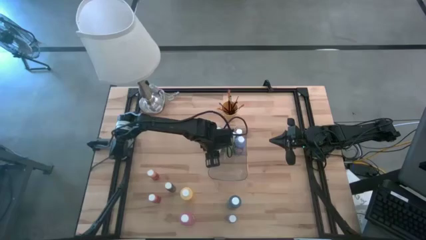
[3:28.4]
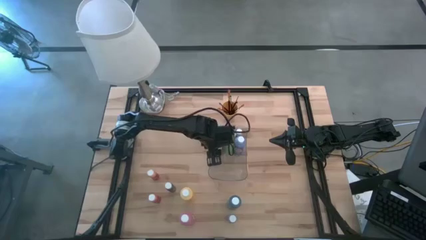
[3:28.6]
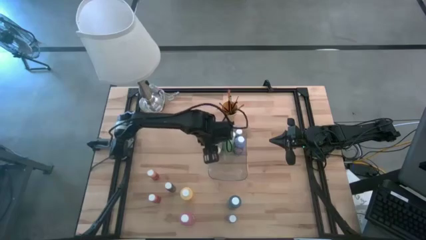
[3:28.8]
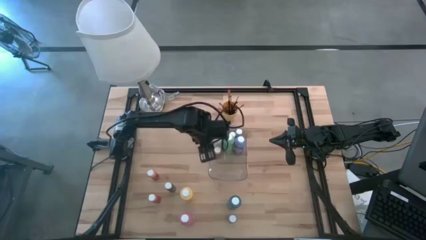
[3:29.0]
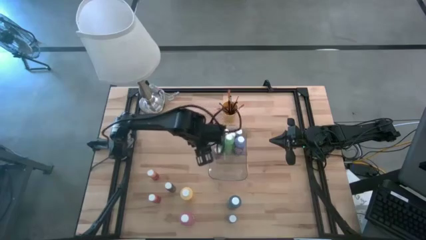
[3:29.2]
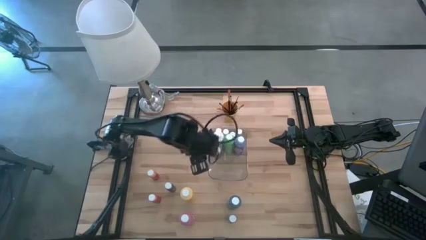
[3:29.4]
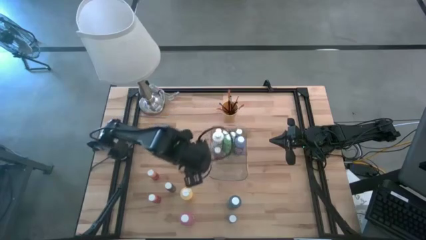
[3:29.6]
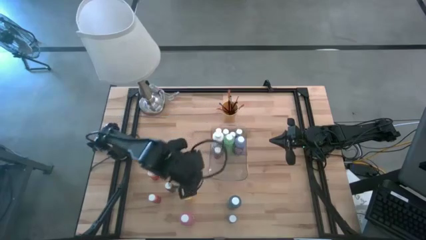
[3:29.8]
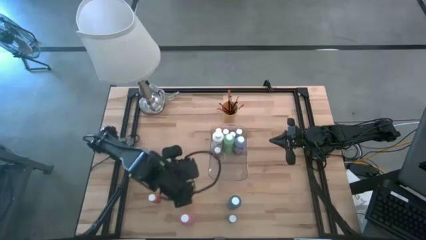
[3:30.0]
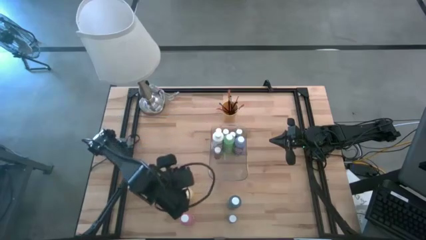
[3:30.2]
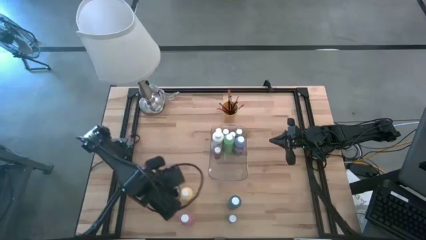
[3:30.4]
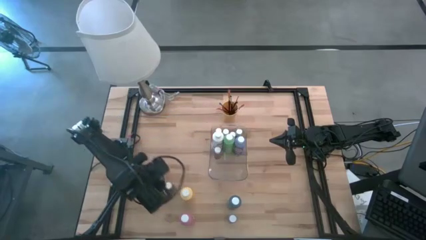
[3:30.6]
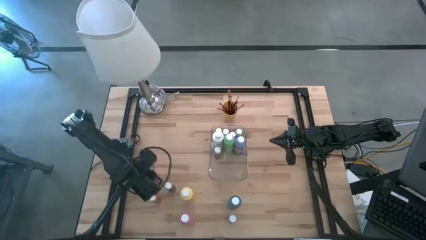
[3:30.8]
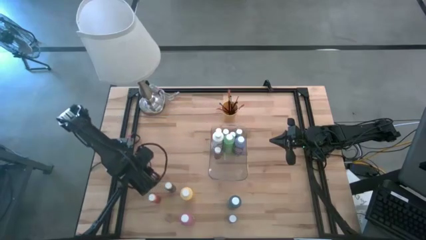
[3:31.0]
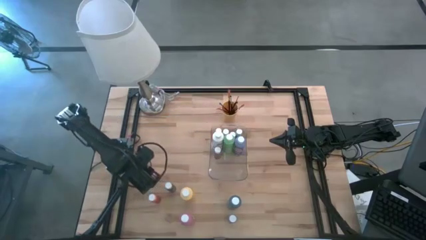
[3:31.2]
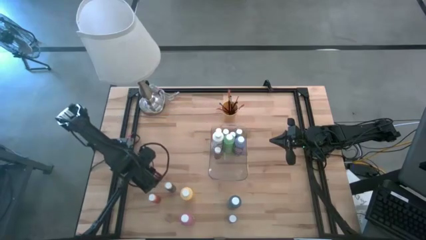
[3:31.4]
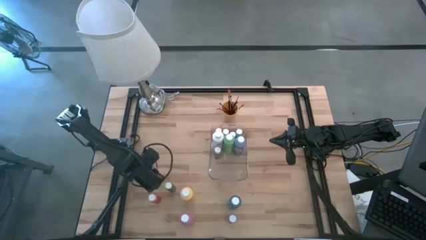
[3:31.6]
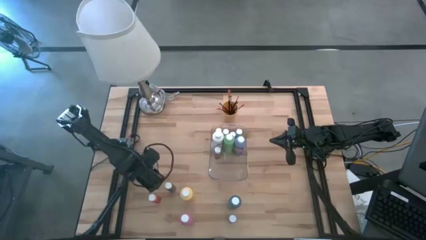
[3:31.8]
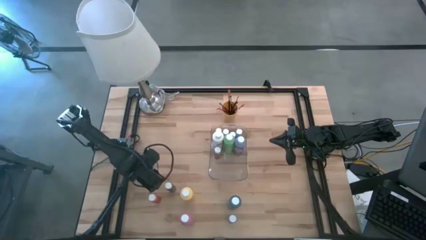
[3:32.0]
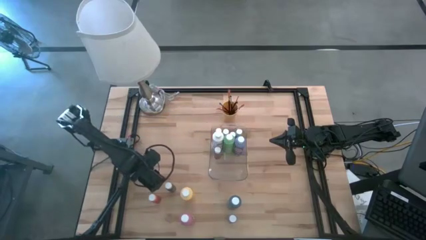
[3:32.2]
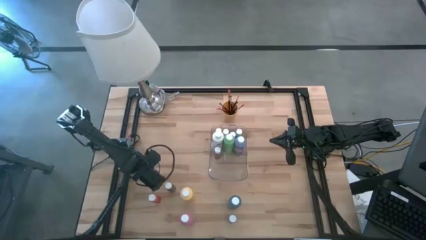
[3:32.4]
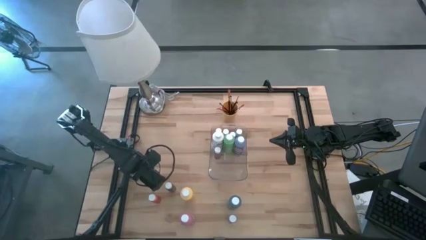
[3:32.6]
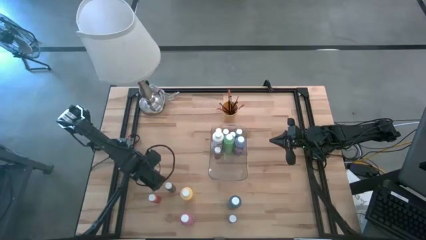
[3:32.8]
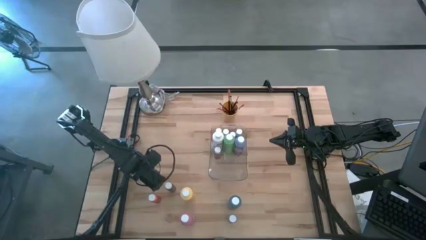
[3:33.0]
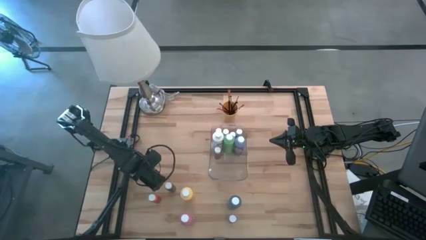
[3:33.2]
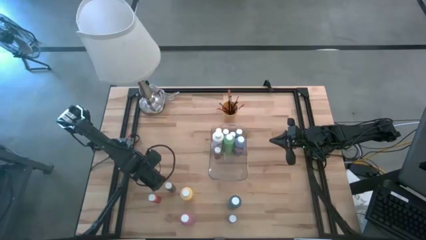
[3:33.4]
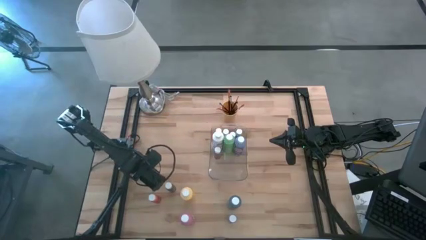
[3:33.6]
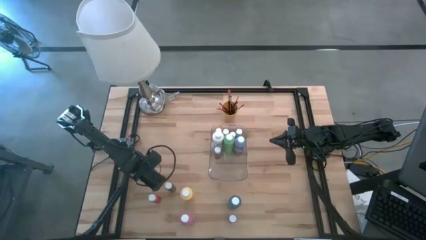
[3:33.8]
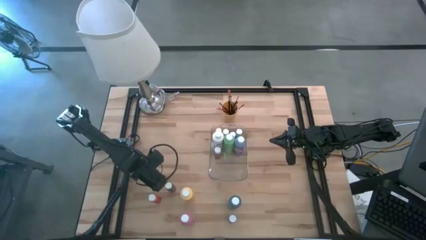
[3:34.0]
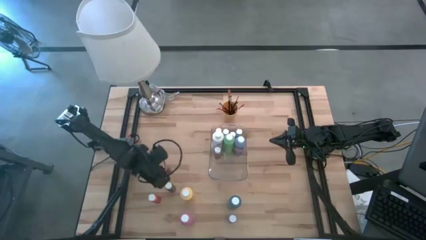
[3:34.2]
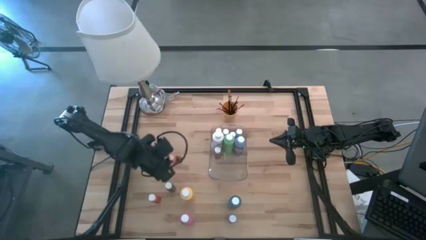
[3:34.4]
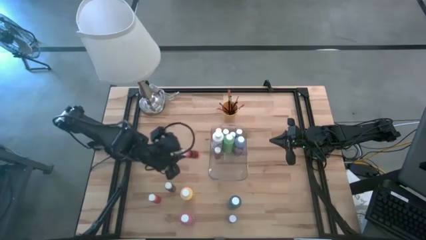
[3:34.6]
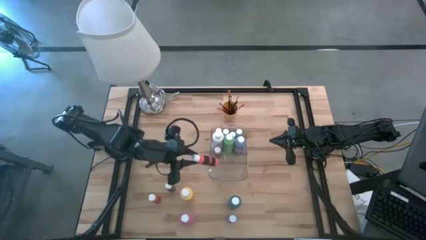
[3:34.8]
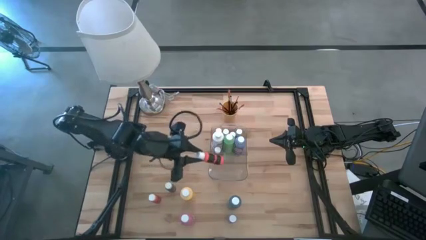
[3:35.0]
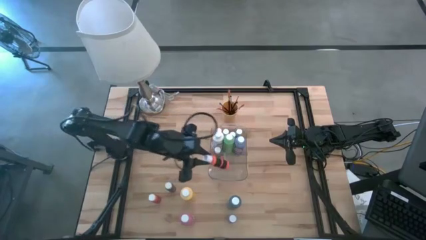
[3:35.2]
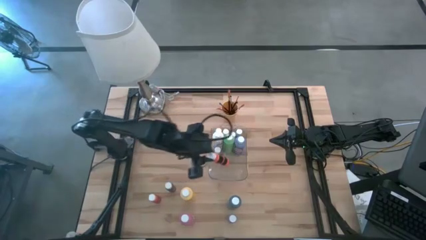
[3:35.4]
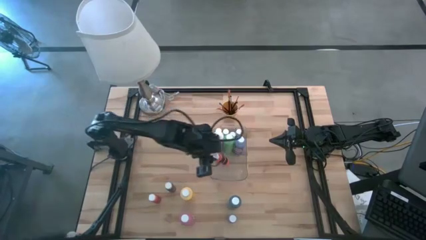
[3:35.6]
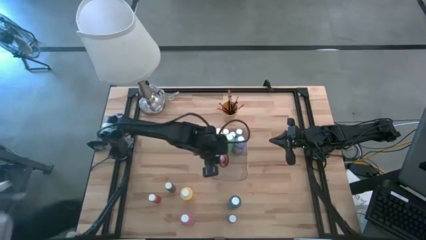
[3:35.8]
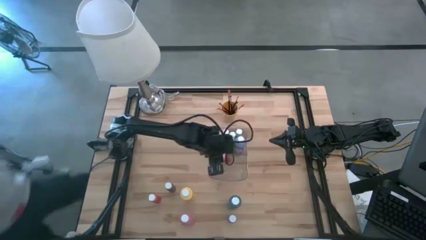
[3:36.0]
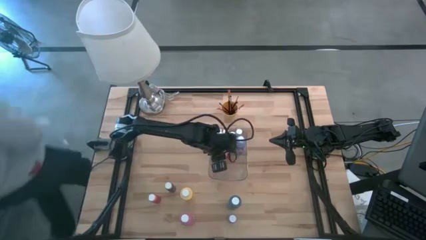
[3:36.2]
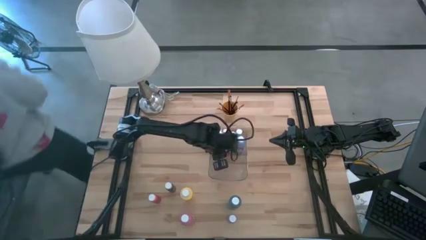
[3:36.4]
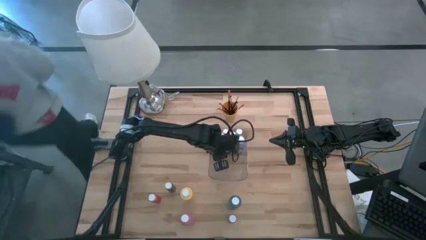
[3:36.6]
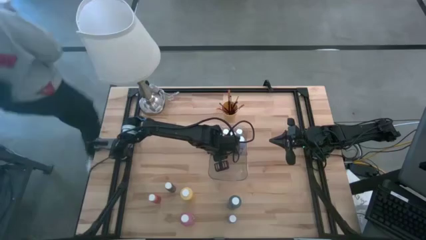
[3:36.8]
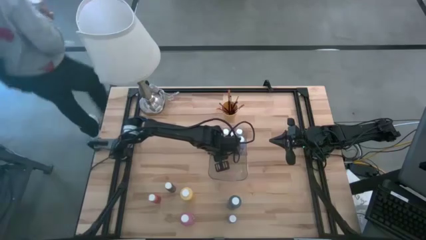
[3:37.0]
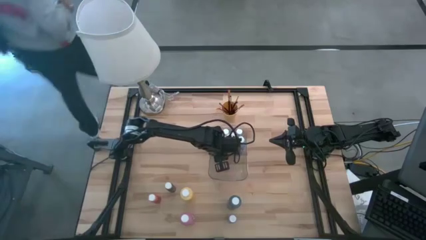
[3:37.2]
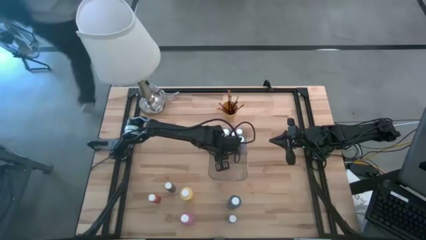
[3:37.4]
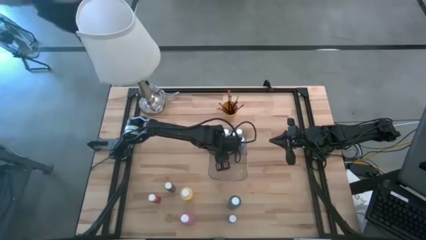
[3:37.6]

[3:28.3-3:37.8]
Task: Pick & Place Paint Supplies
Put the small orange paint bottle into the transparent bin

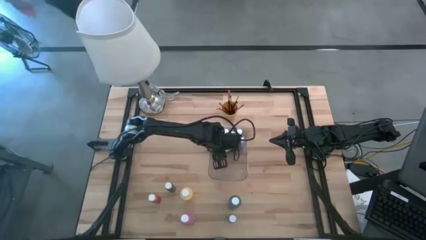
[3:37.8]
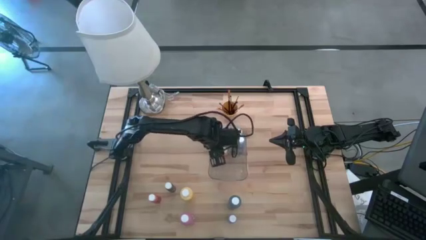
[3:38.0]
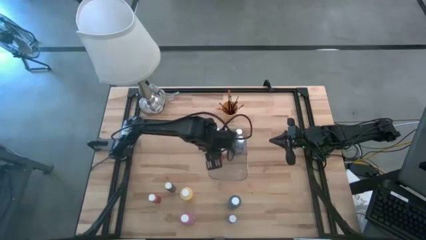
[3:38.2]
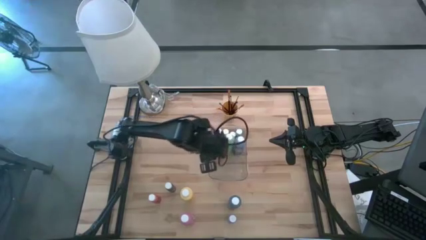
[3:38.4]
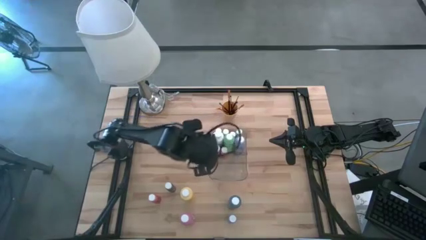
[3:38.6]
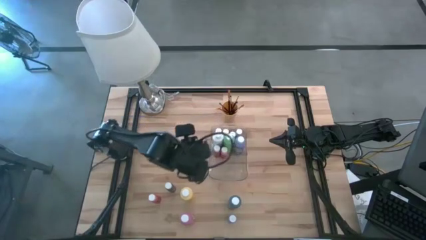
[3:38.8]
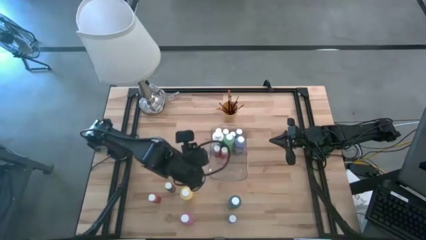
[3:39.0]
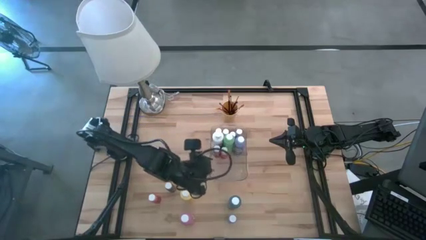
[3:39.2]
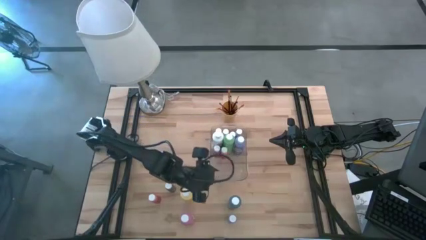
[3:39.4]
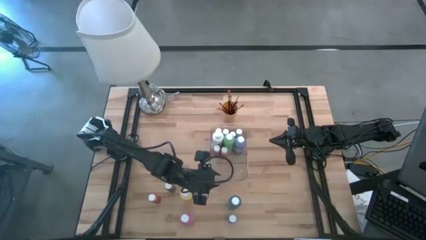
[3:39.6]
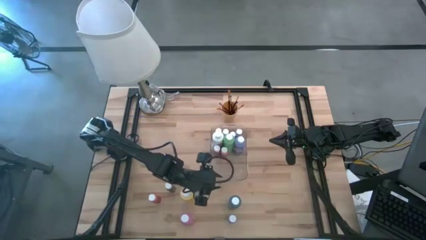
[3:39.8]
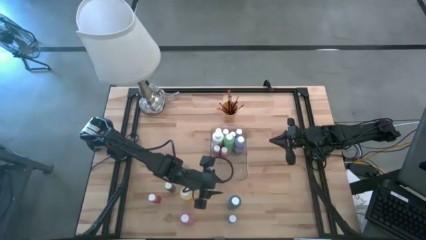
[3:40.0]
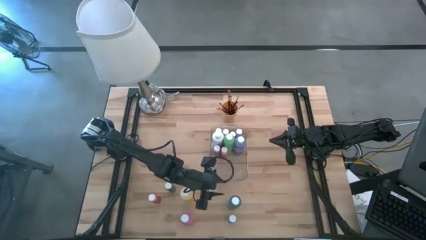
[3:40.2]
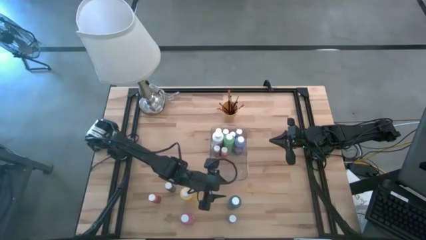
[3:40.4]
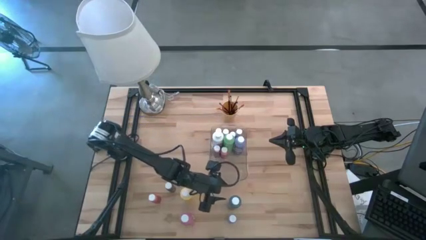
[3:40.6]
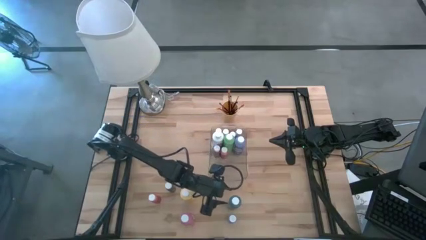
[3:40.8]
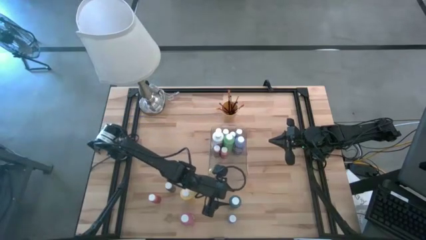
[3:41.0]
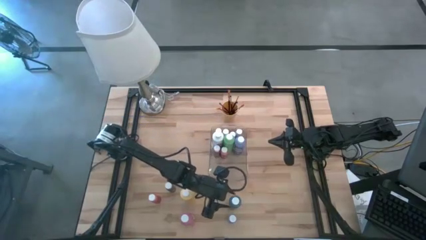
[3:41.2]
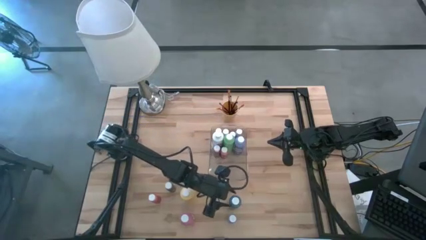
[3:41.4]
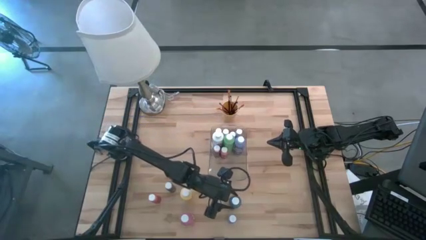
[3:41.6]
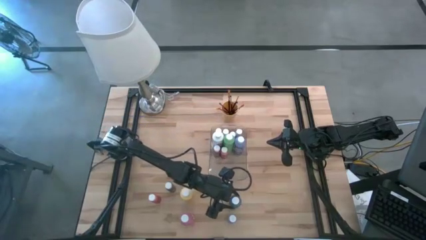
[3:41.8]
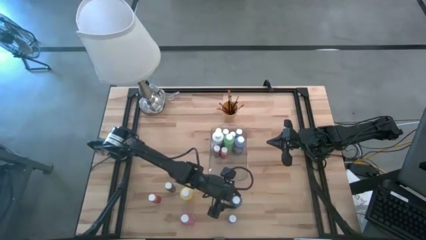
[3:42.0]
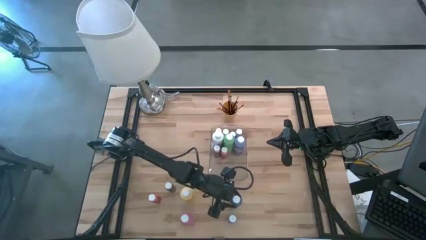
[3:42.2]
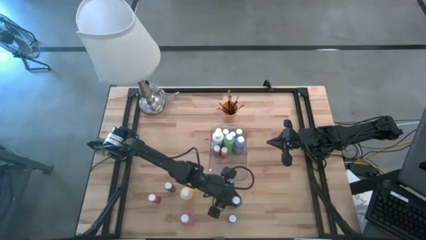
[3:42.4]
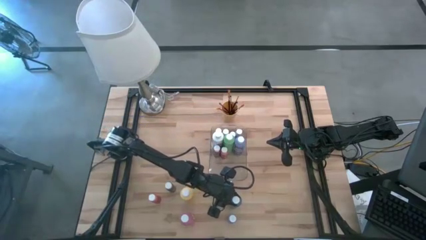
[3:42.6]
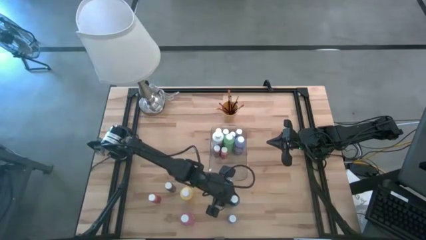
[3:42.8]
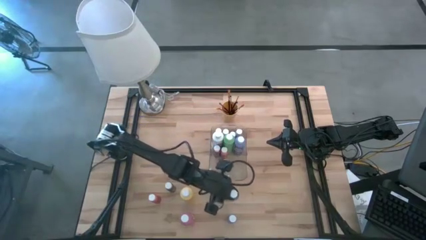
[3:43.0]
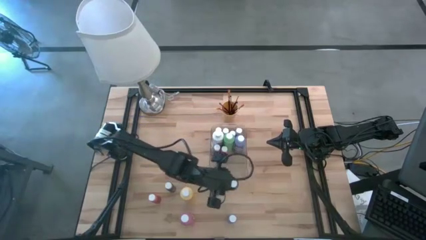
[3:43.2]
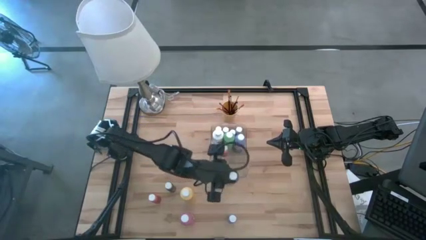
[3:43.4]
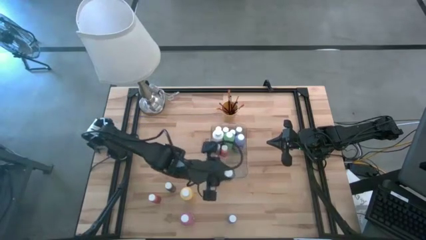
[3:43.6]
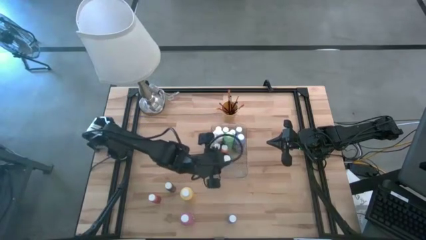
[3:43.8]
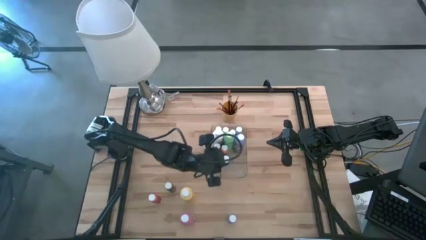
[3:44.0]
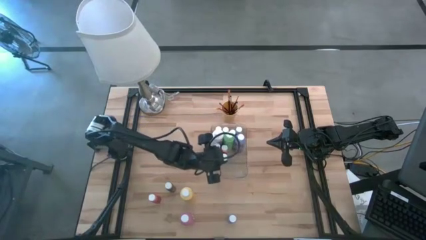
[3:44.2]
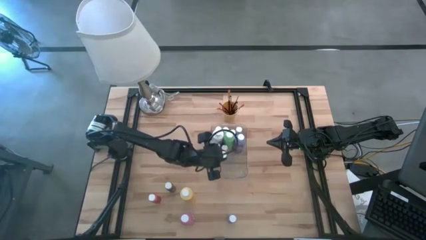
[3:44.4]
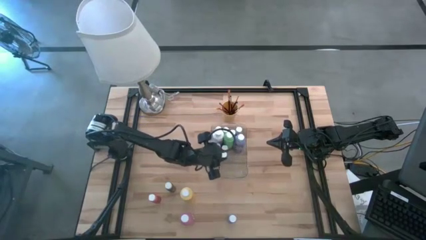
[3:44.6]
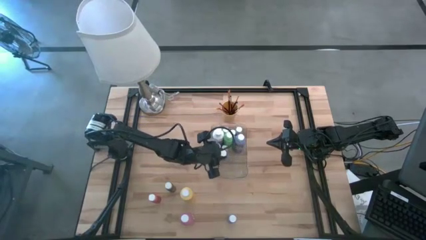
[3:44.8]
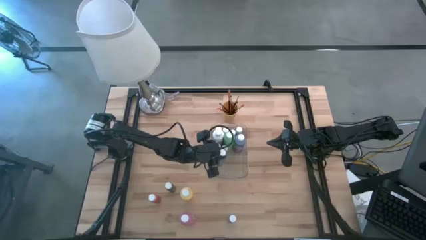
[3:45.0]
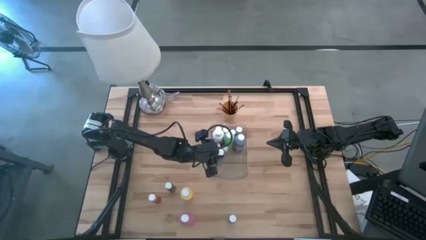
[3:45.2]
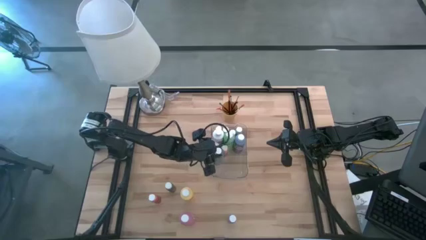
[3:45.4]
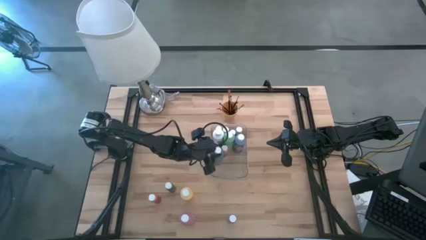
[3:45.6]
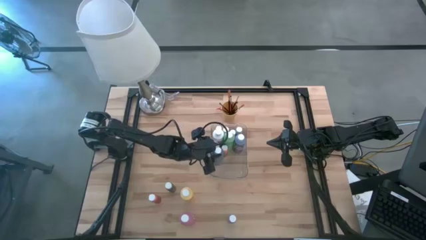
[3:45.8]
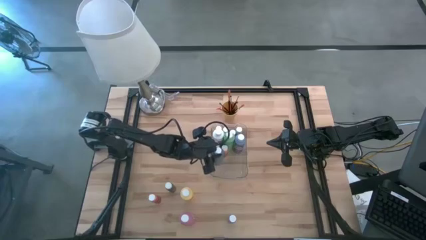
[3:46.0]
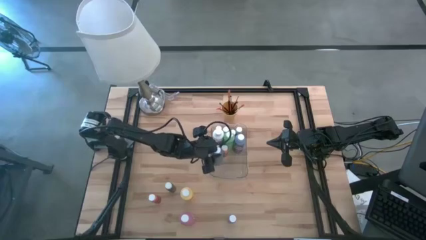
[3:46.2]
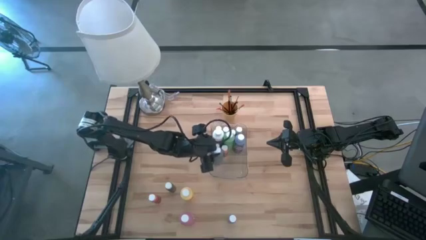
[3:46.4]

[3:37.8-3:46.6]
Put the large dark green paint bottle into the transparent bin
